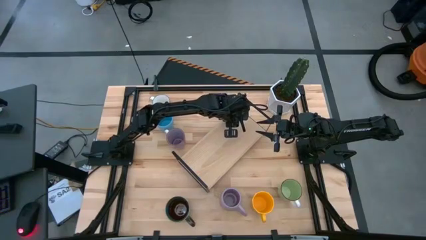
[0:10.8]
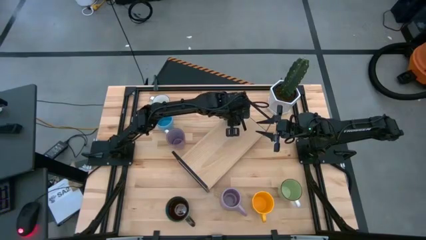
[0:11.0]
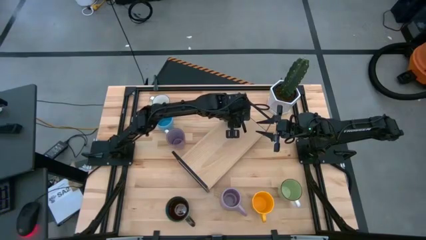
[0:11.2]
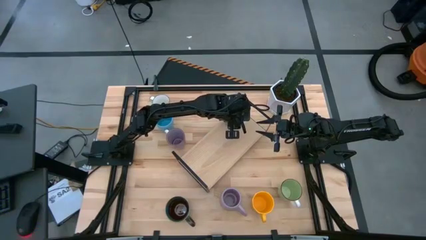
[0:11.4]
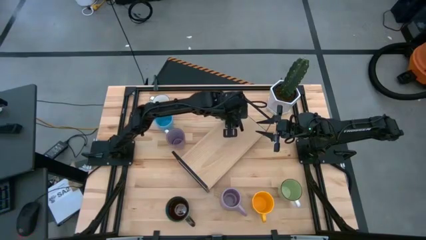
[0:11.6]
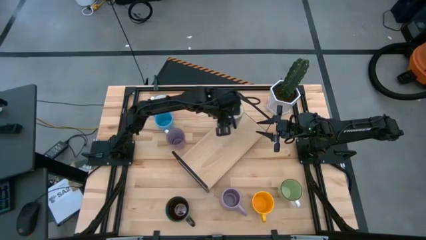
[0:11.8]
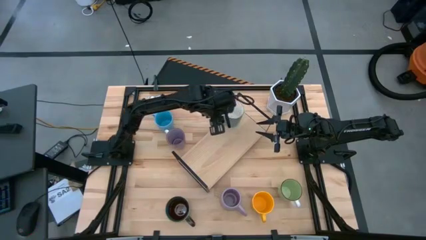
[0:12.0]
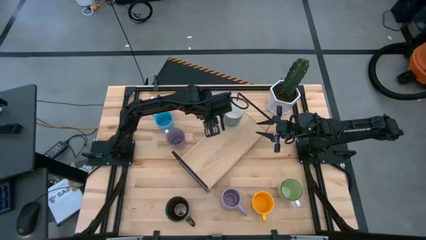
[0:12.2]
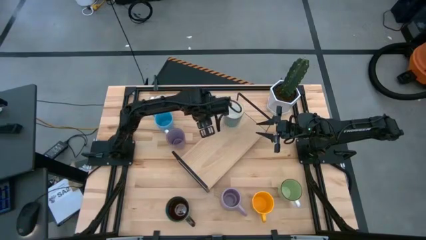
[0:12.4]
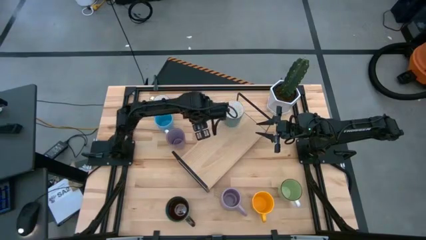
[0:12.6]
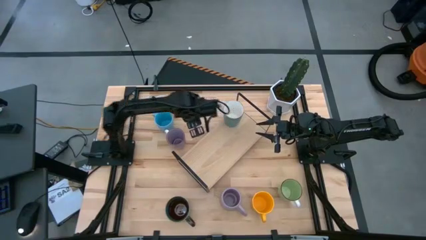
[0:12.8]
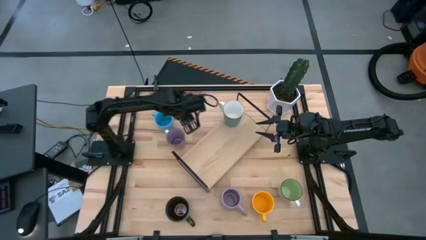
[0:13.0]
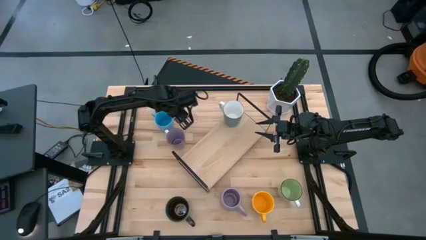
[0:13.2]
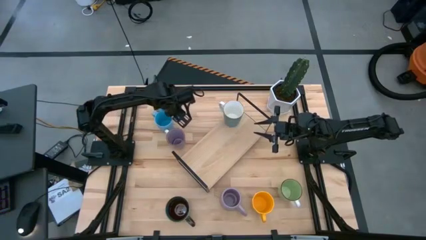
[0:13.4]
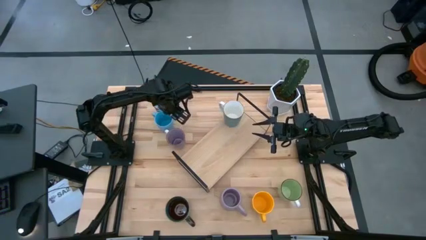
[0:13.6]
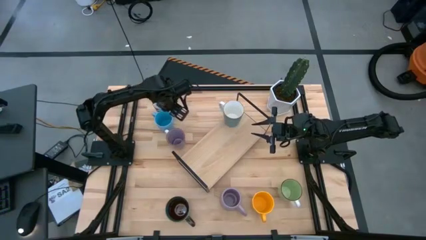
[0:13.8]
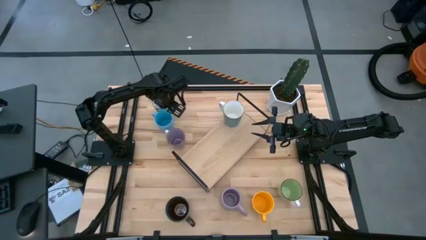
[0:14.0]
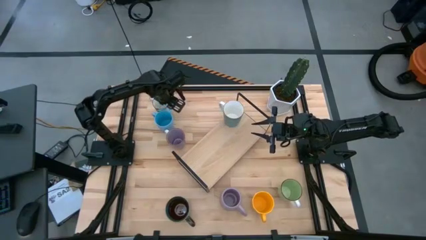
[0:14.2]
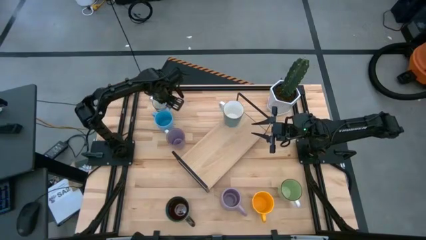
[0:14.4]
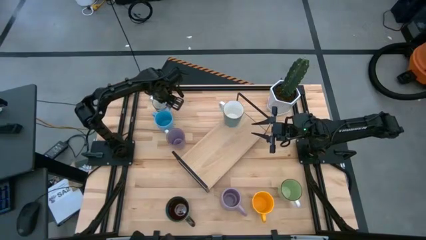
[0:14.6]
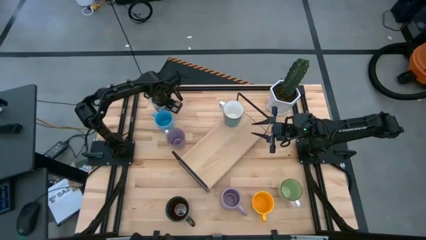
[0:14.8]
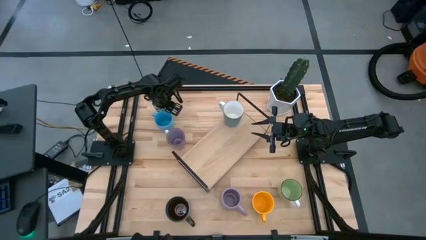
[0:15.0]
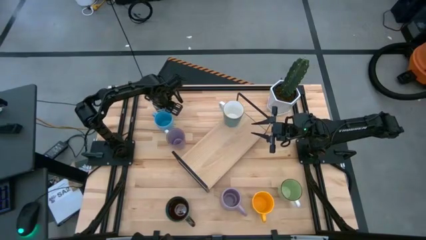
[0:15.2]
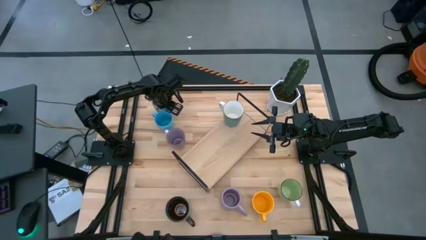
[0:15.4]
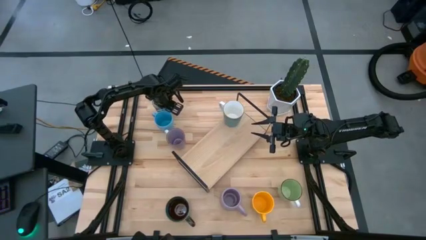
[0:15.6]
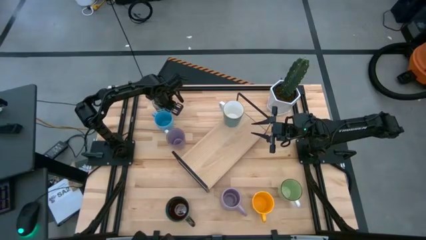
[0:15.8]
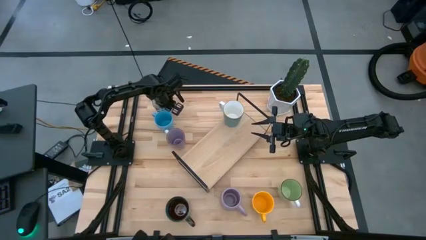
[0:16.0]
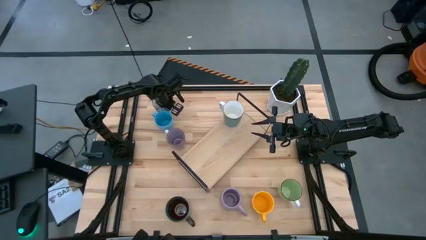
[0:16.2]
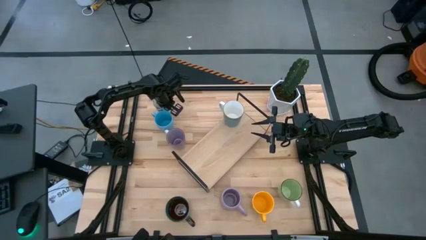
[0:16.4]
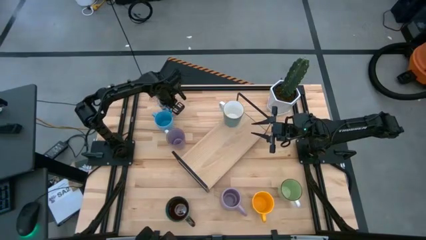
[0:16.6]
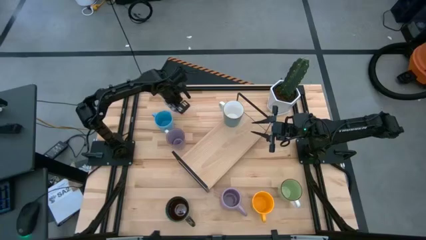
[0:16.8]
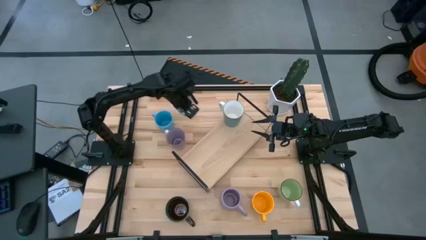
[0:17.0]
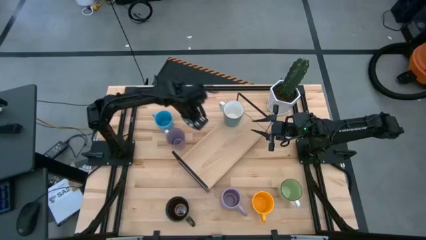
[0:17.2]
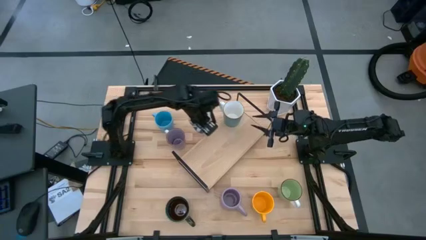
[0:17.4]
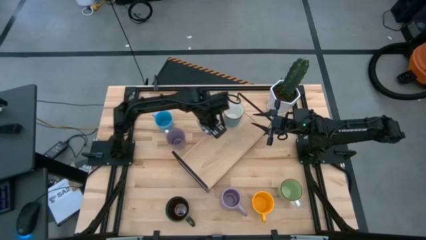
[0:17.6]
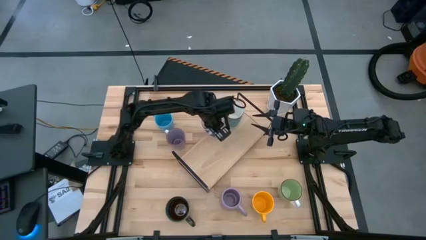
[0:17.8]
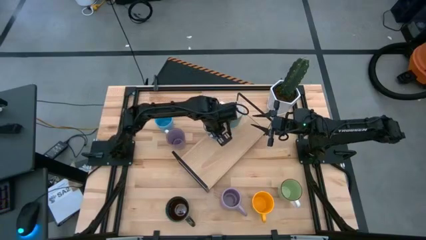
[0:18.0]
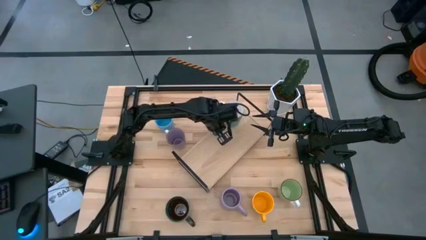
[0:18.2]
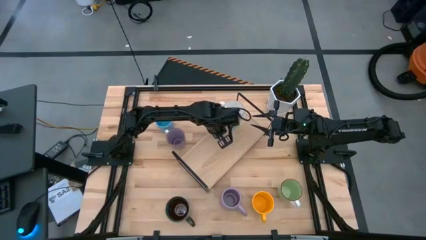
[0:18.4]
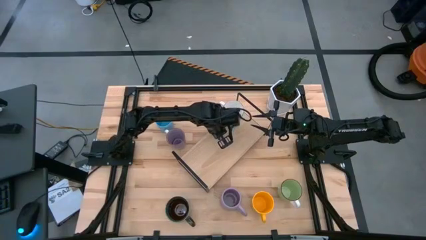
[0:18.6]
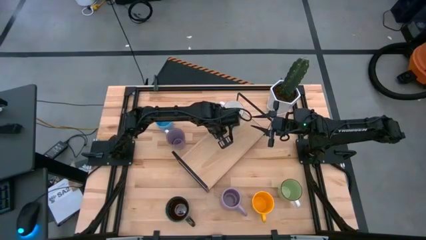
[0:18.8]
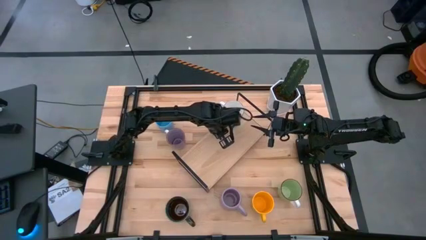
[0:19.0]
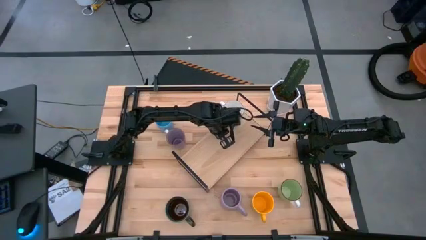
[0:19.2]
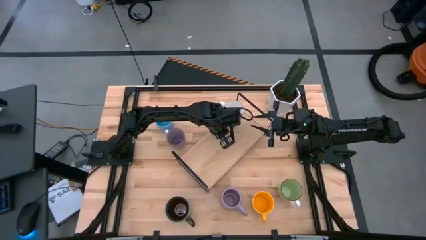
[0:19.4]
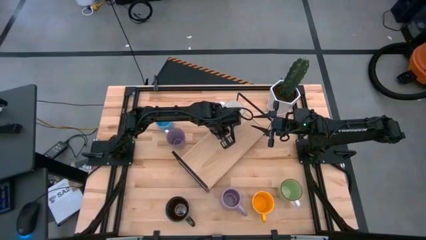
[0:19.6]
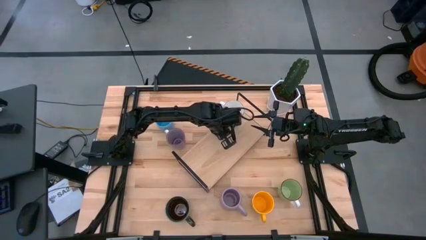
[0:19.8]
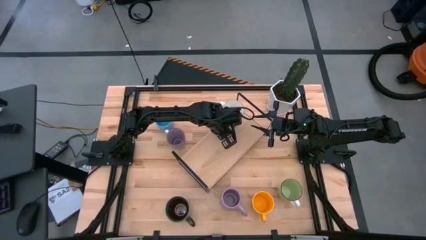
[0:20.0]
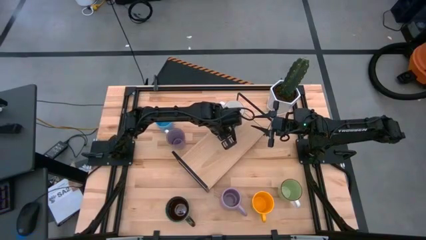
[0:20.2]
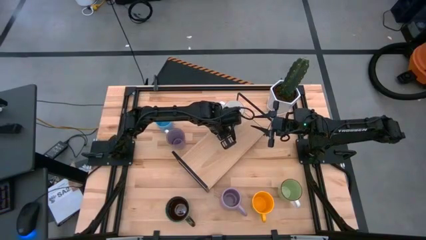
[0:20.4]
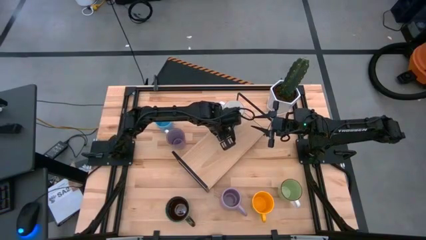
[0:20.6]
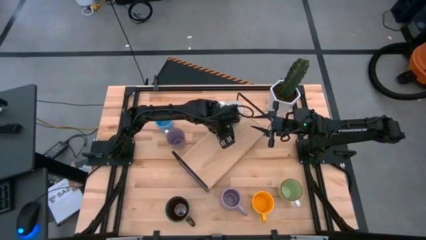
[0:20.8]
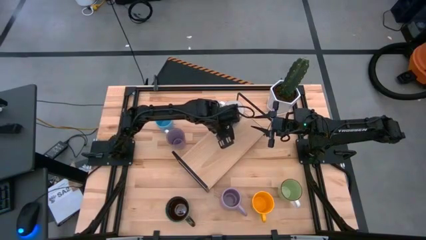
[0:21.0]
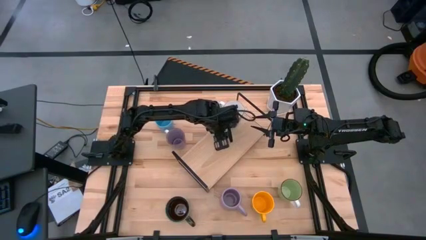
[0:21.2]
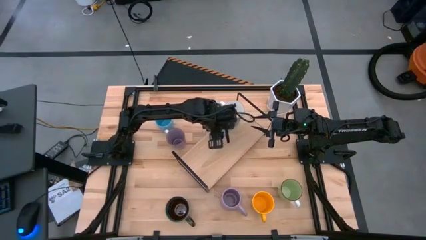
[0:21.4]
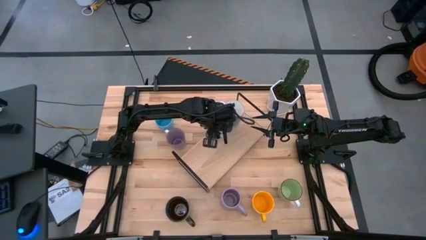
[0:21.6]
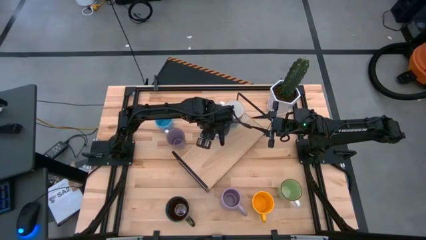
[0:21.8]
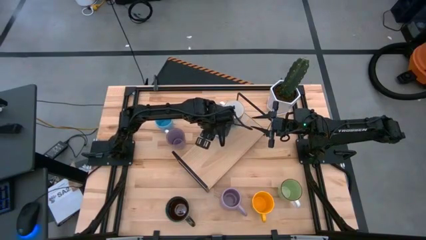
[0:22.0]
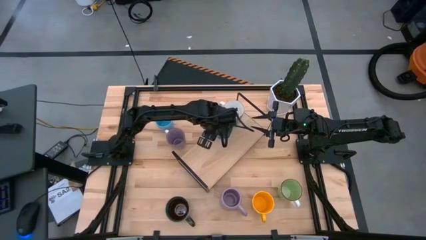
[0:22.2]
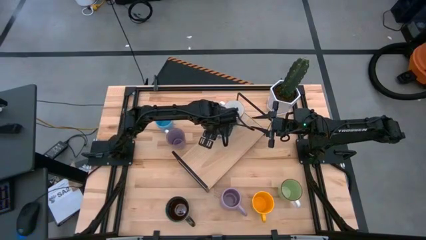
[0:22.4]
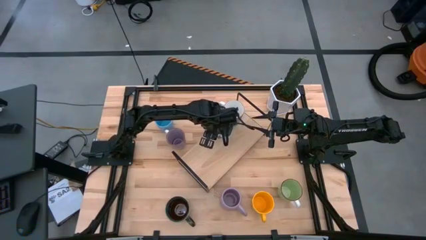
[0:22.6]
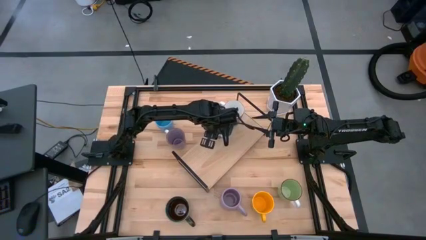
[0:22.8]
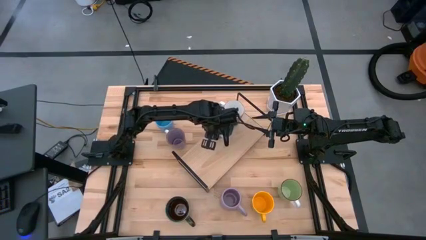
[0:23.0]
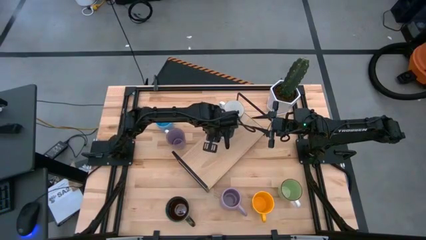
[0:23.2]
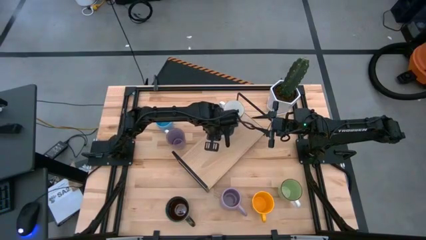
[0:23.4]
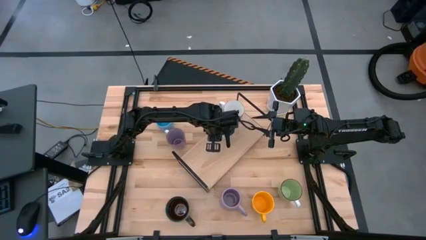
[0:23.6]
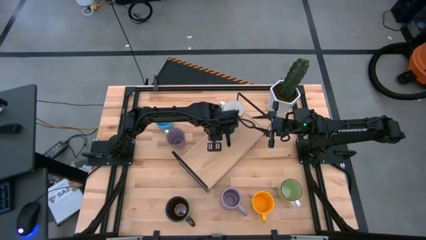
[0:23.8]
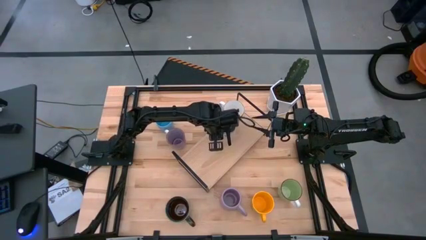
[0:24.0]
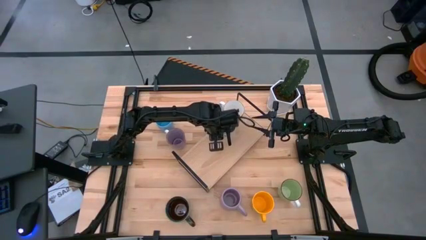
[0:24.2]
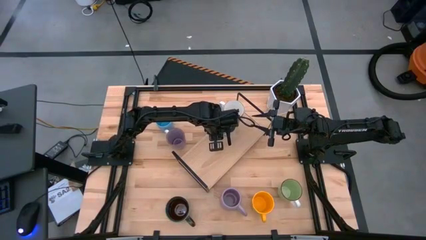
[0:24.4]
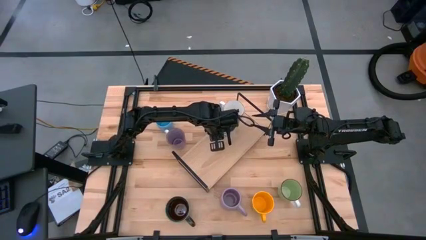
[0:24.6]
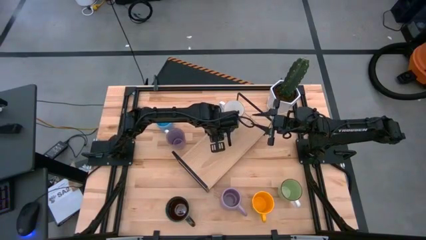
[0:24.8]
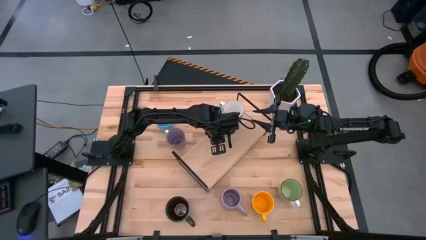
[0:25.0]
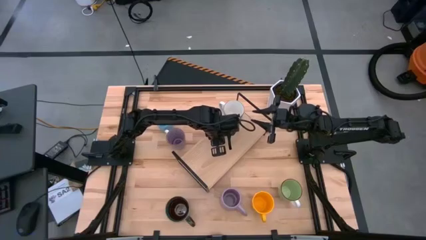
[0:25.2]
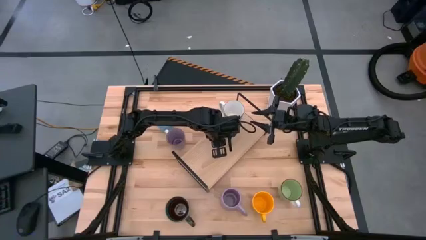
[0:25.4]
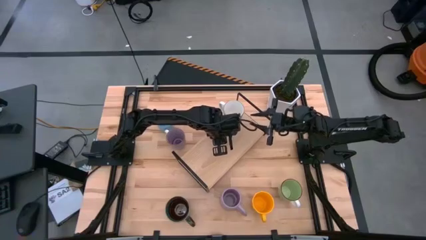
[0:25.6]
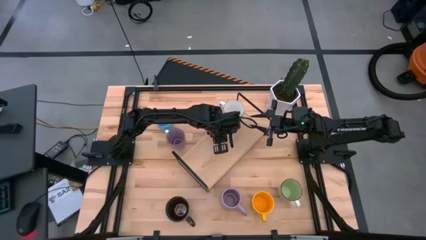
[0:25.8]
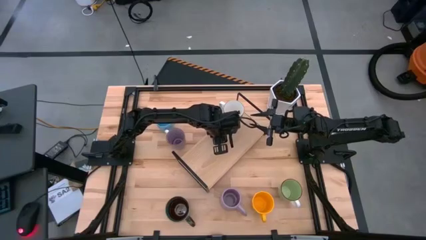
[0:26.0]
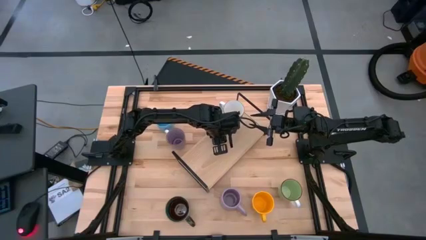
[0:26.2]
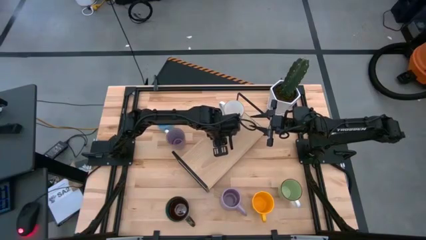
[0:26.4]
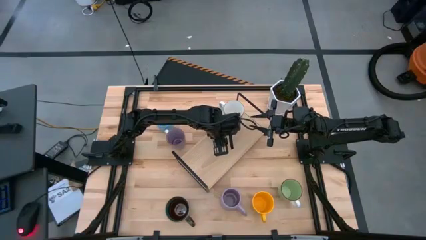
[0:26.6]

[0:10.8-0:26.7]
Task: Place coffee mugs
Put the blue mug on the shelf
